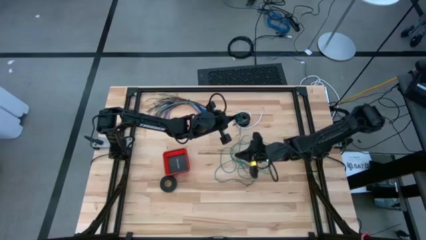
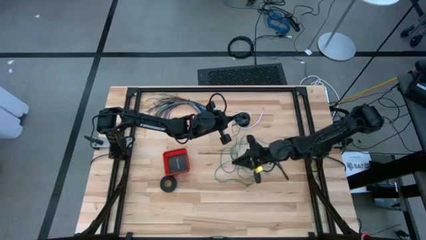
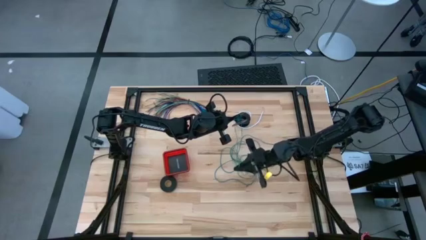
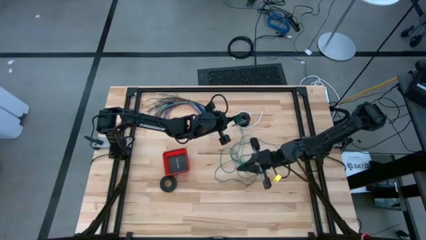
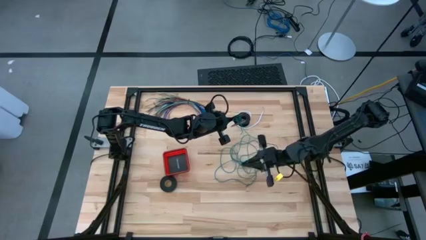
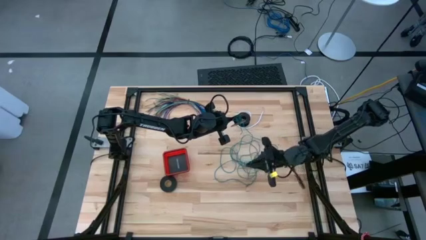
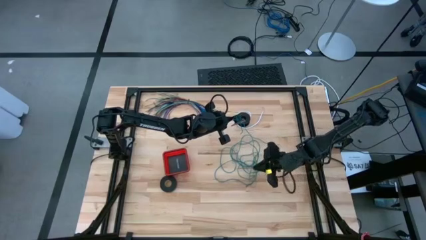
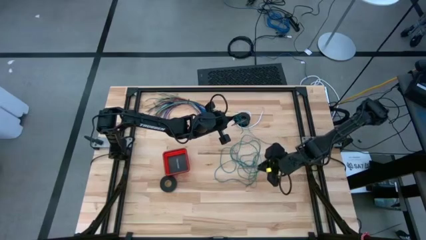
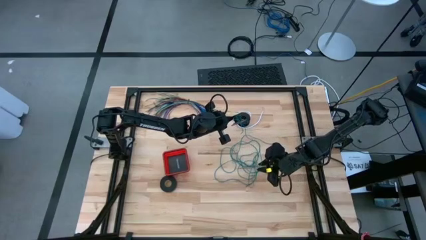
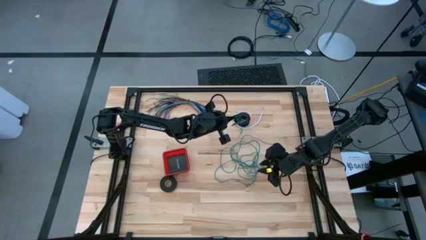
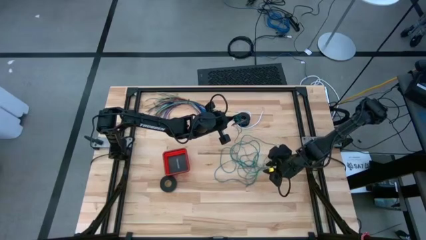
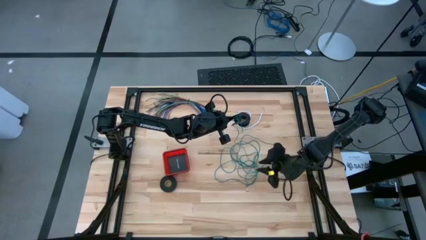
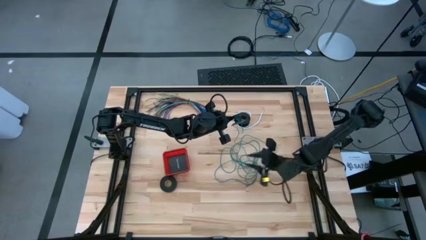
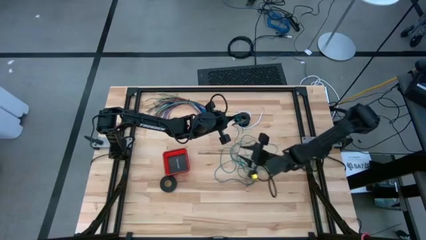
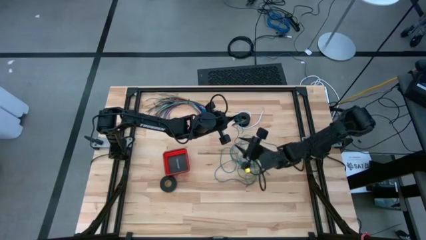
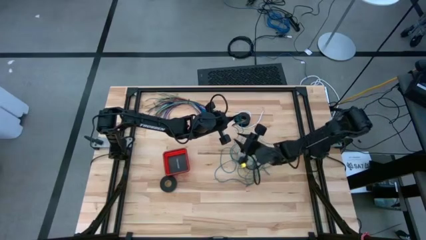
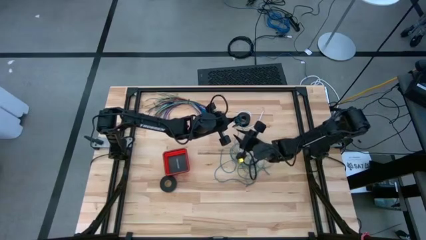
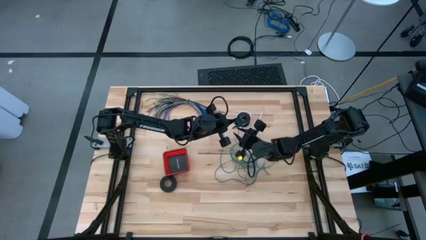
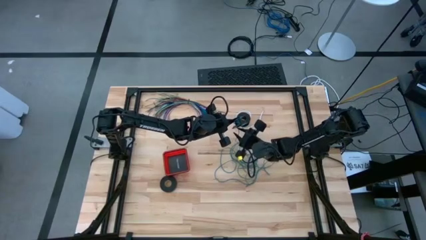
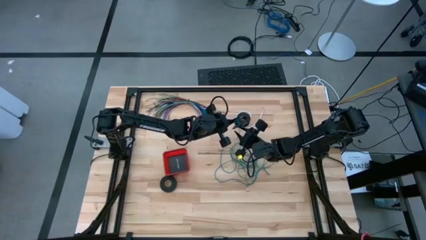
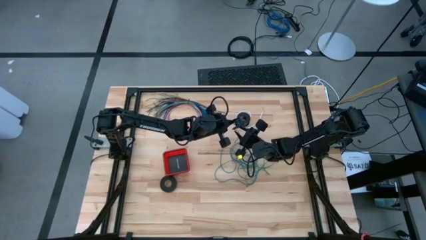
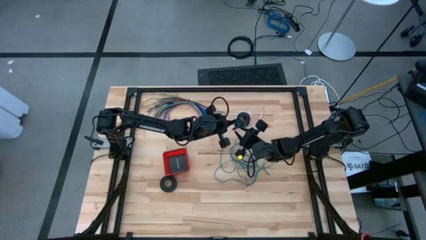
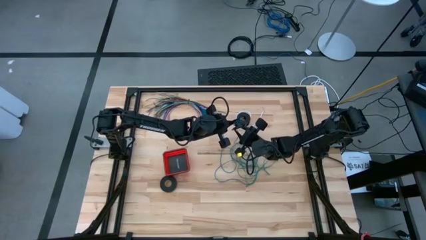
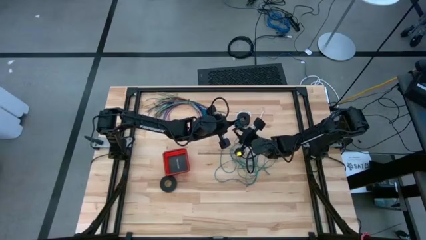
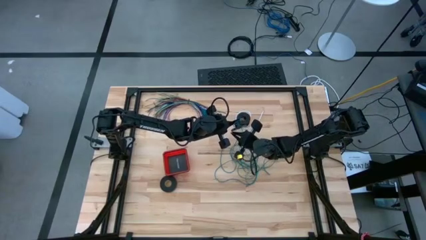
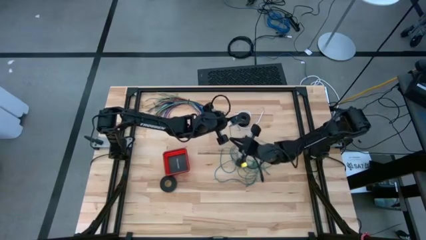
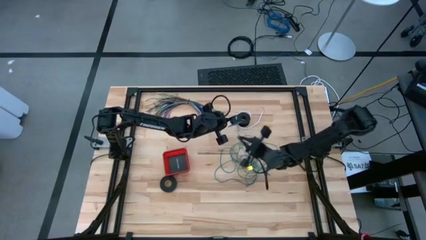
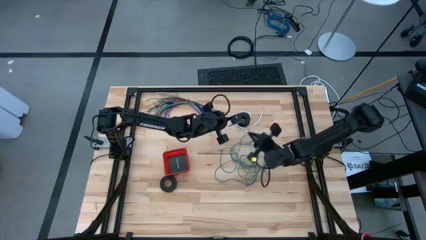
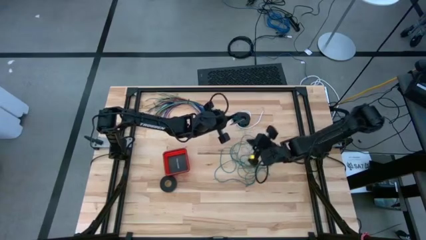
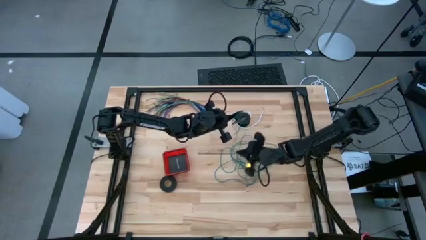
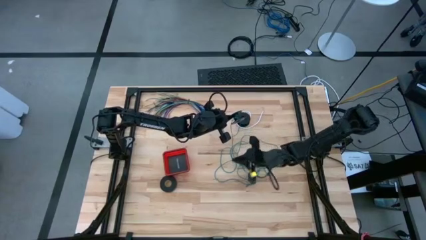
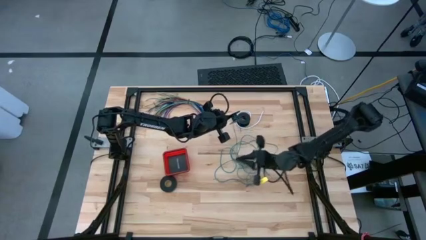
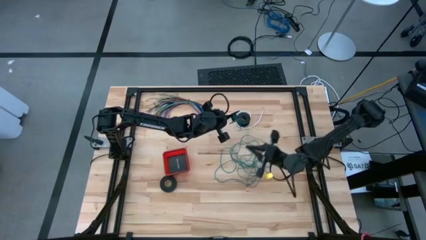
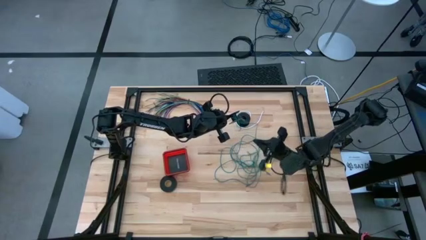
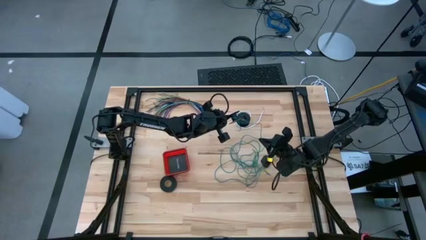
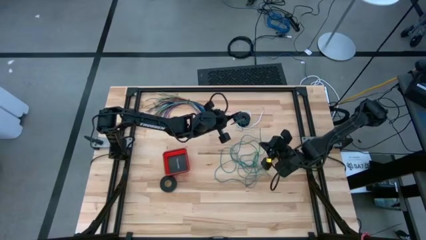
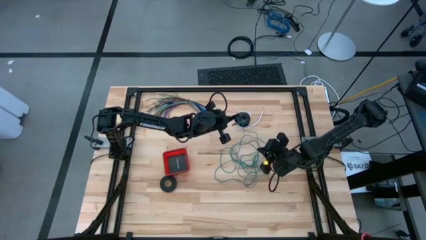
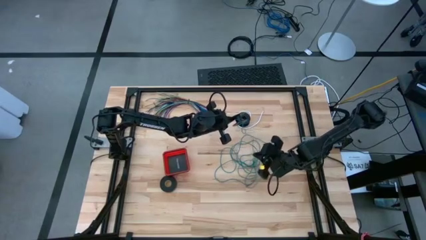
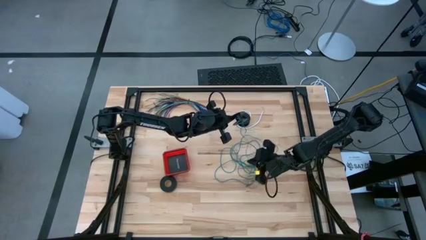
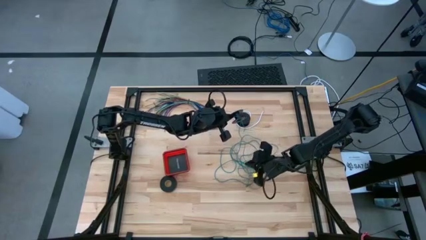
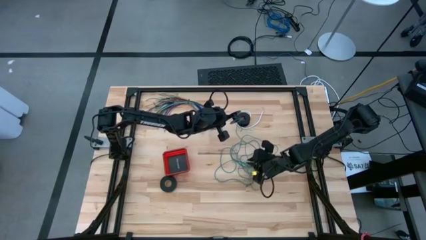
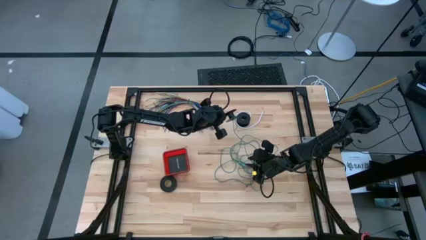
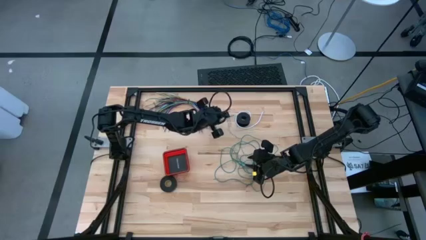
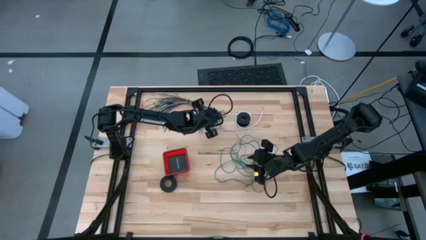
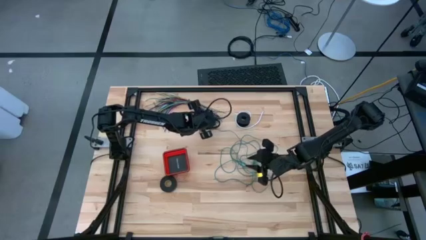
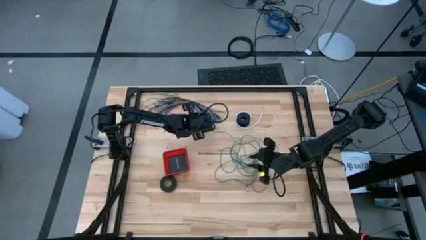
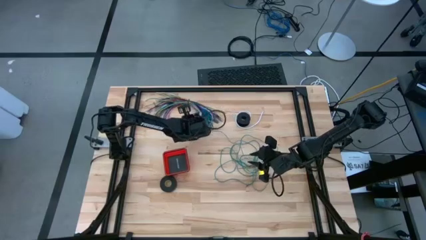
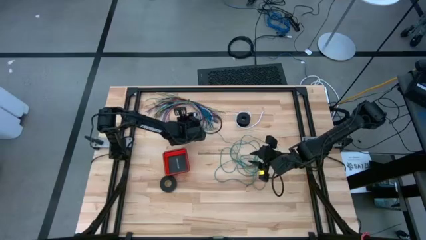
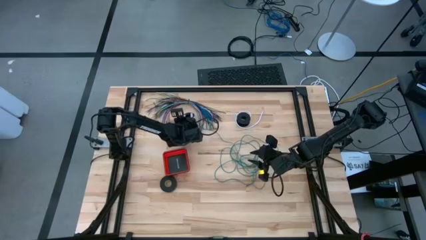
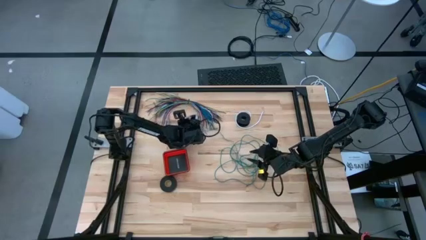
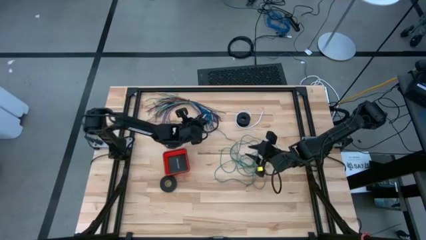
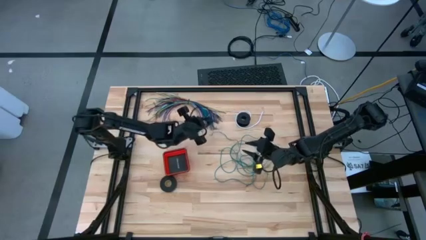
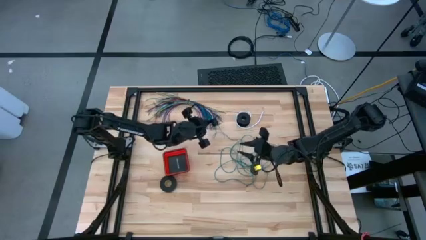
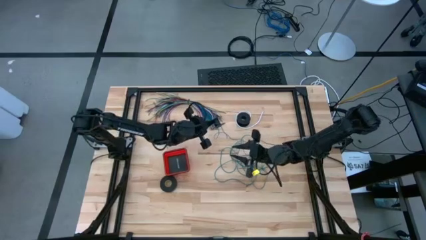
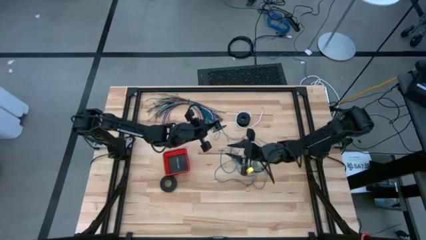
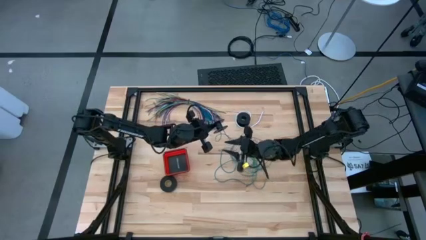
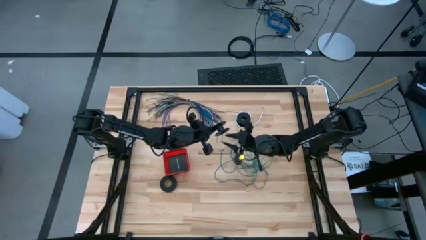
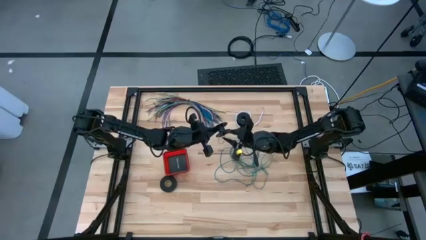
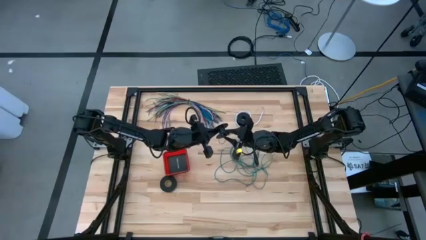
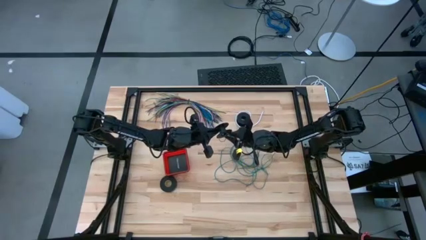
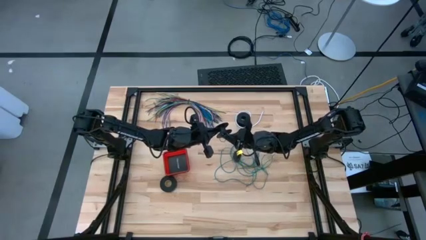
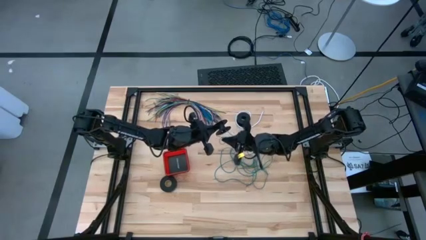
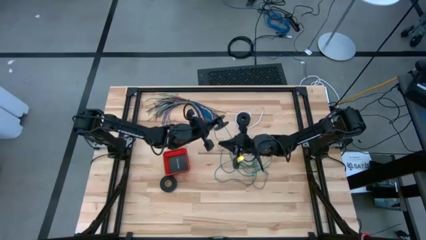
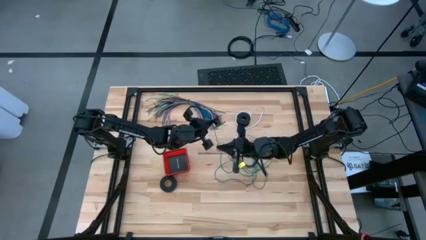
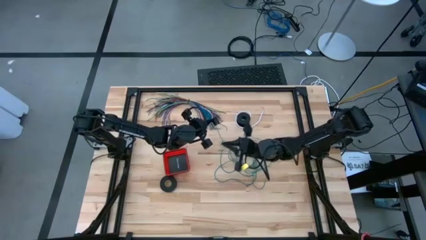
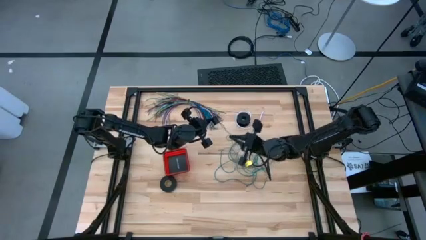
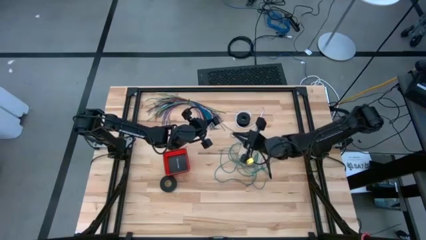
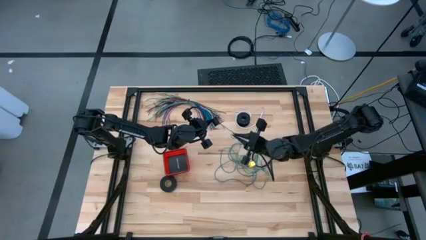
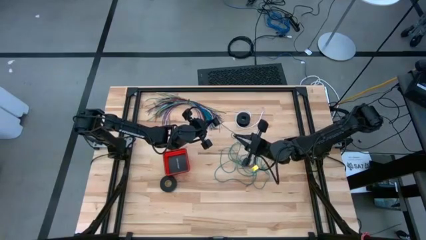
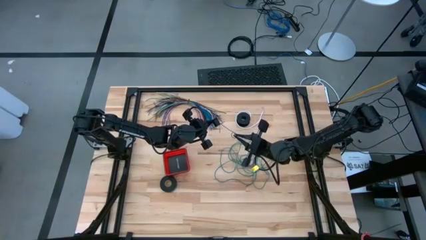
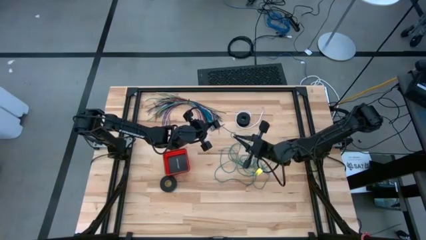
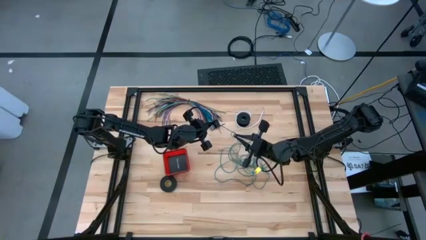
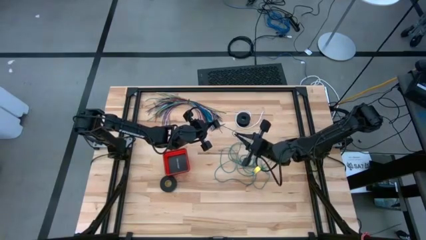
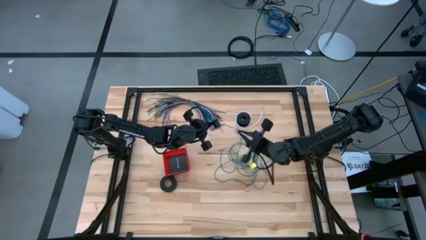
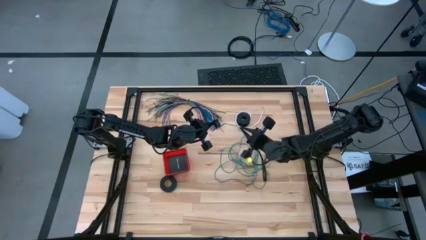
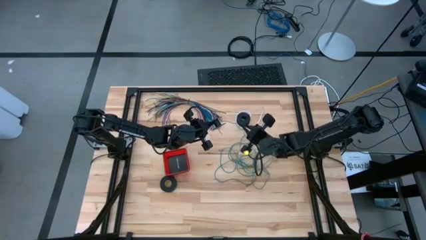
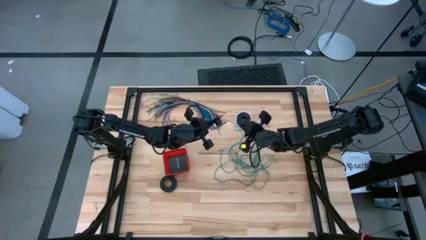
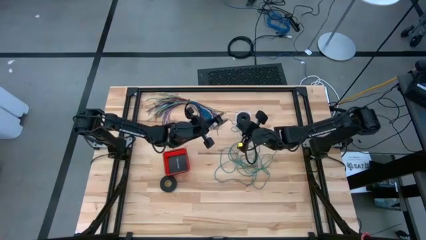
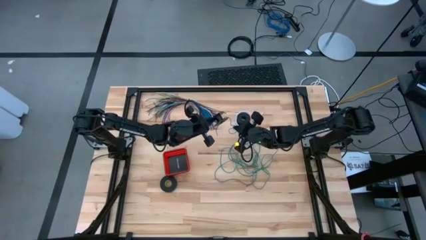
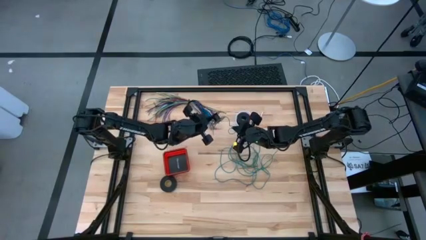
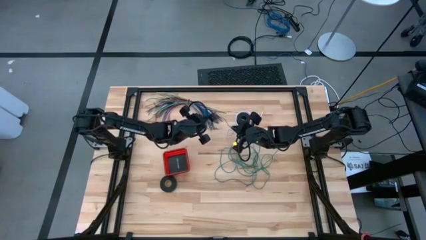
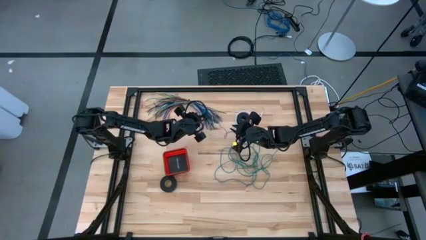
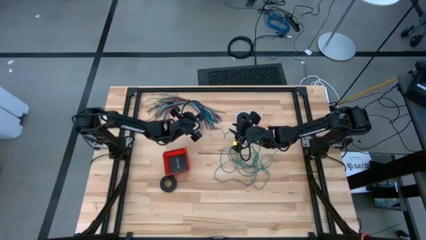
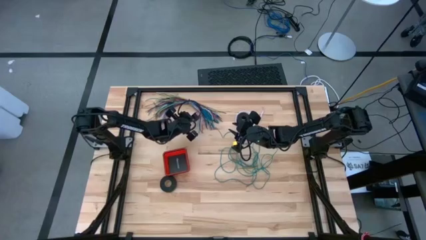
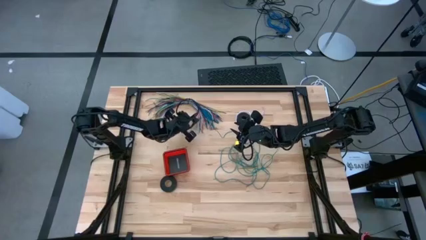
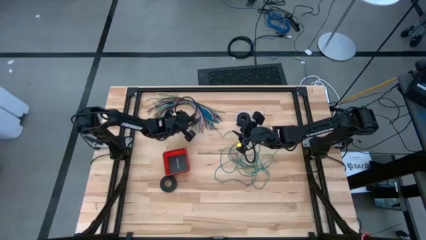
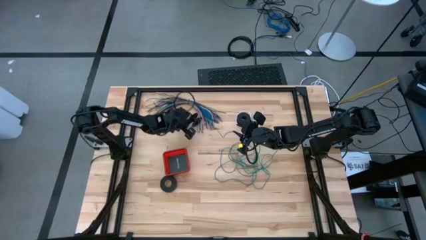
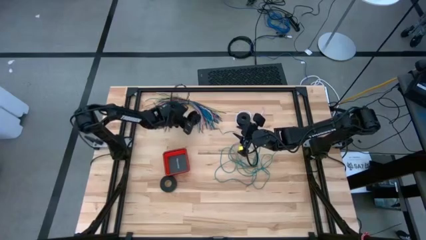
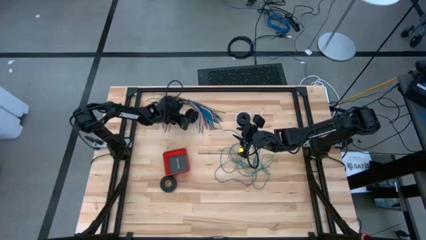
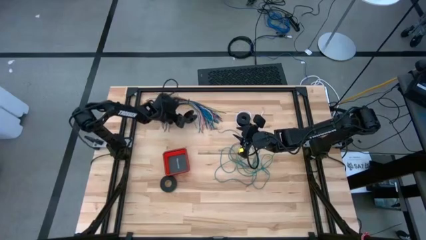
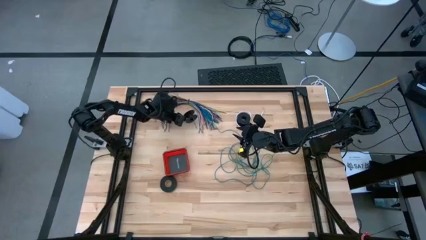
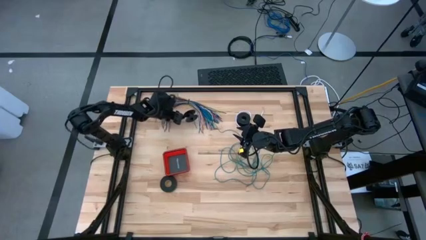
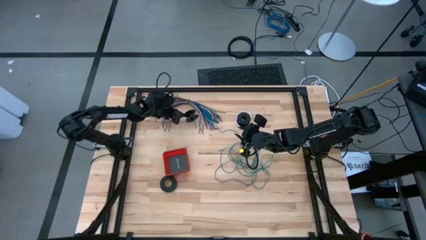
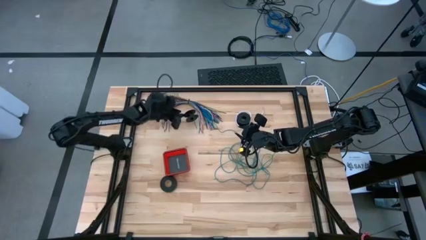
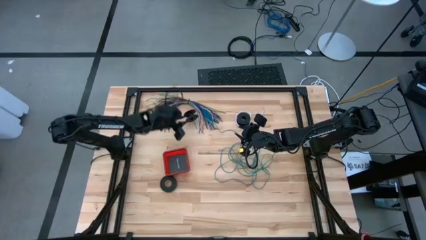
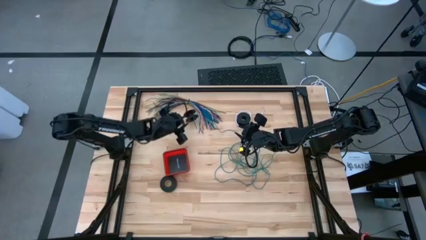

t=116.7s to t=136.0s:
Task: Coil cords
Uncoil the green wire from the spool
